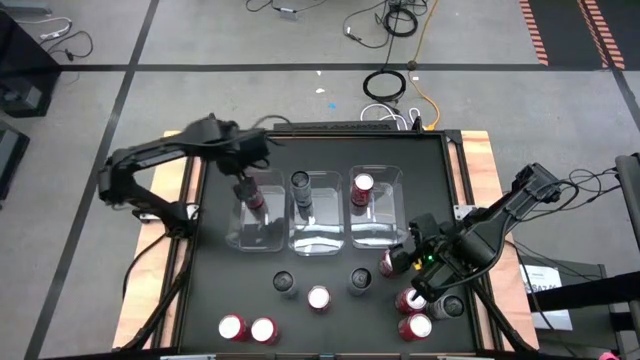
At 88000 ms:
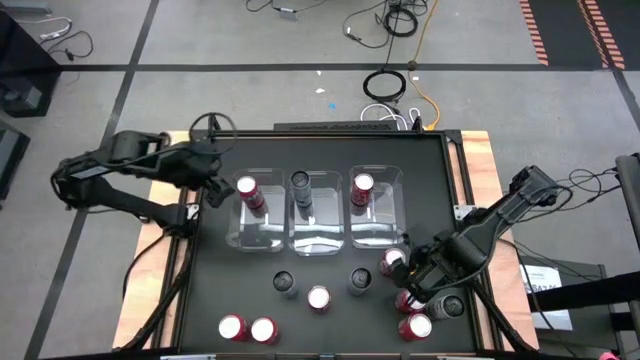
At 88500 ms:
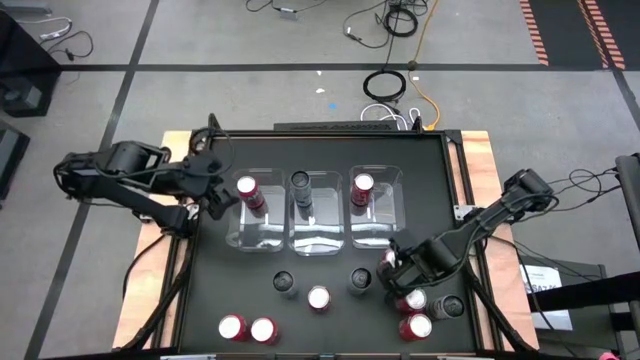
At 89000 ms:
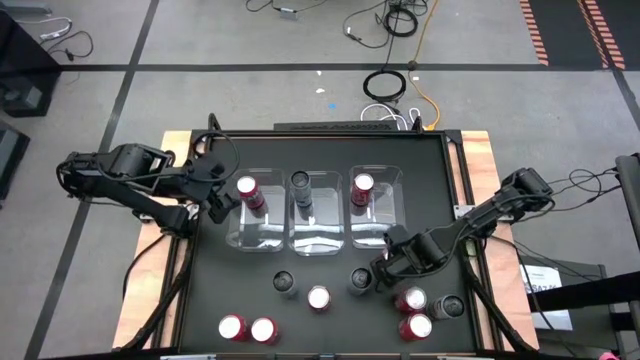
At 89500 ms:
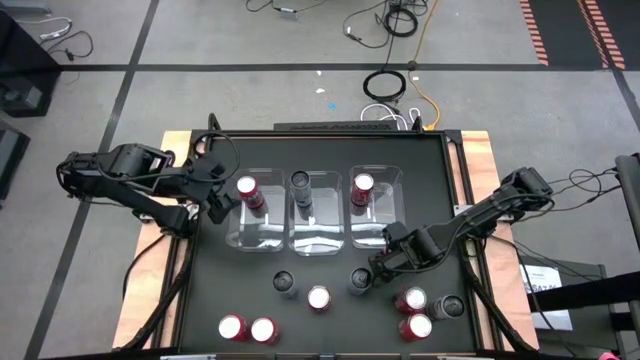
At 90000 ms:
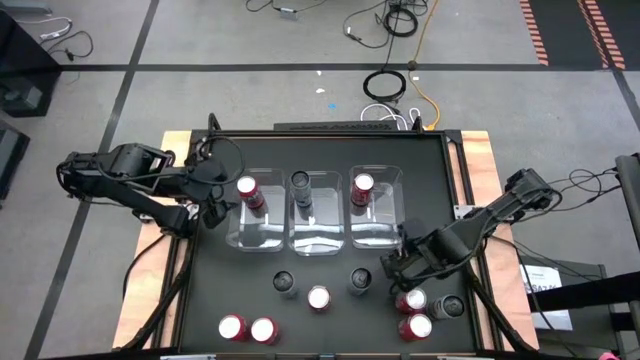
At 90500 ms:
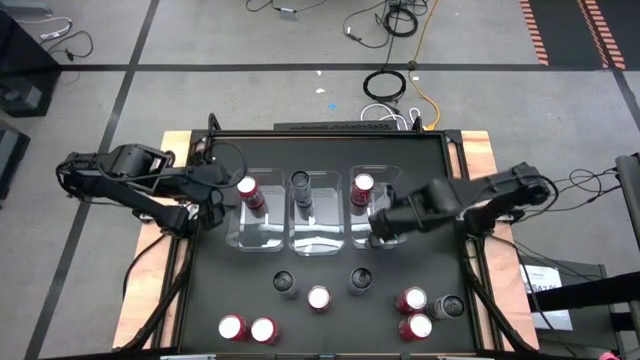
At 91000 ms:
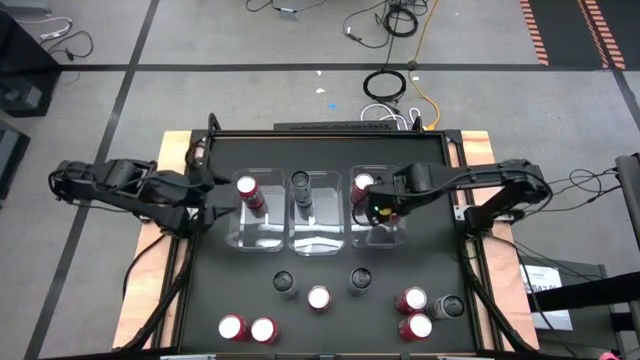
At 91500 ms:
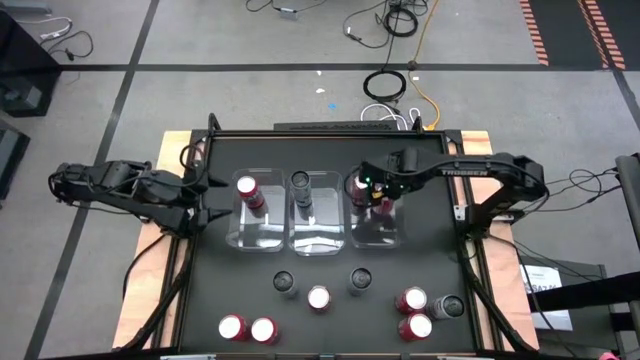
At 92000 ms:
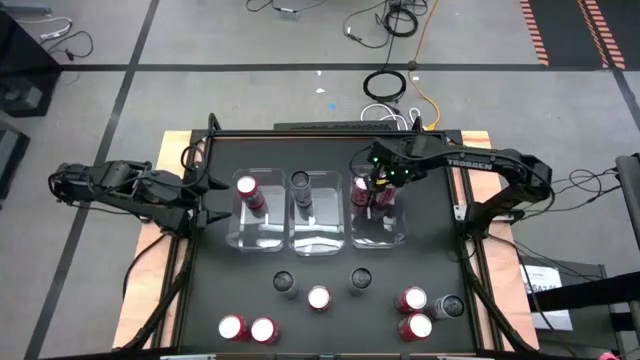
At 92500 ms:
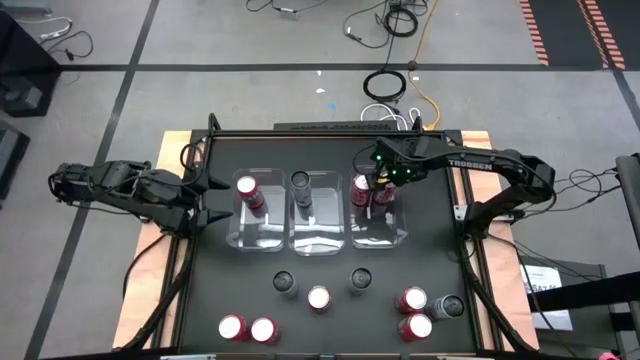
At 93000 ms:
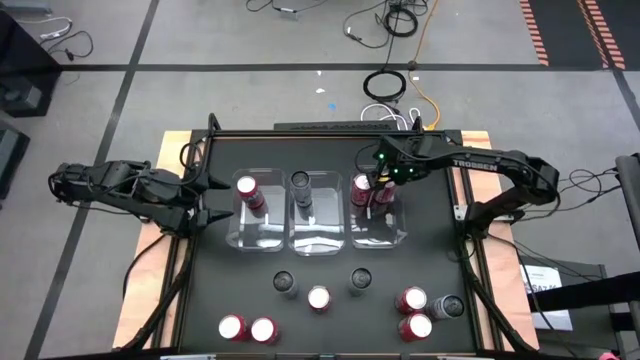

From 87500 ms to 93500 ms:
Task: Sort soda cans
Put the top right red soda can into the right transparent bin

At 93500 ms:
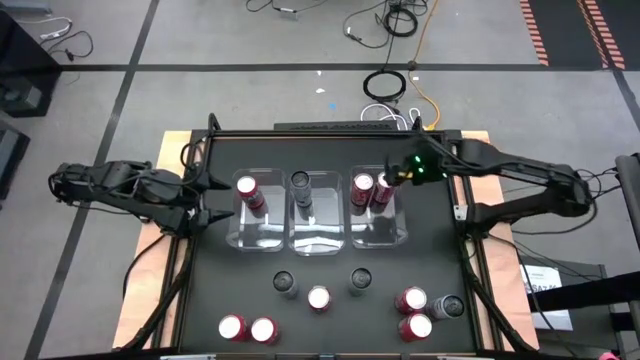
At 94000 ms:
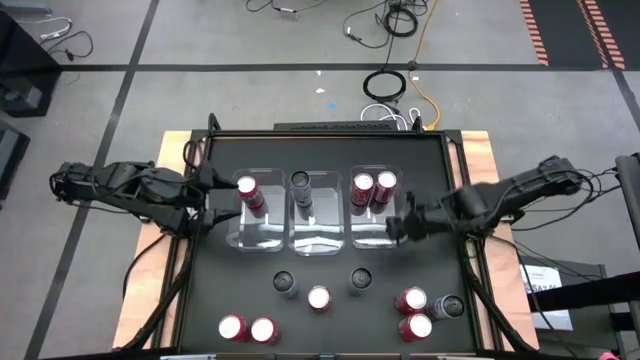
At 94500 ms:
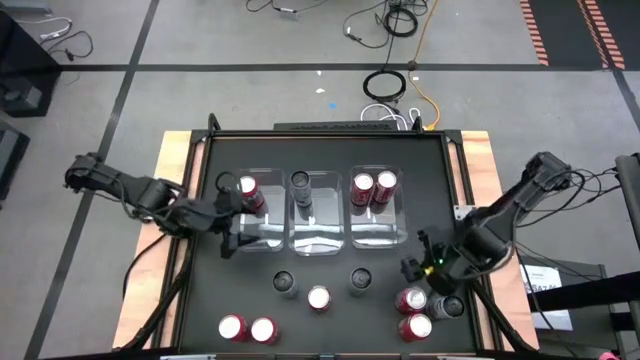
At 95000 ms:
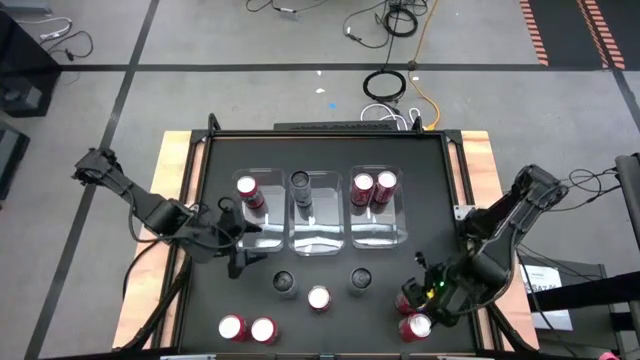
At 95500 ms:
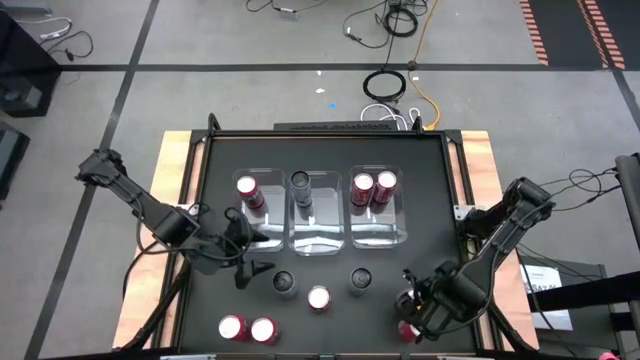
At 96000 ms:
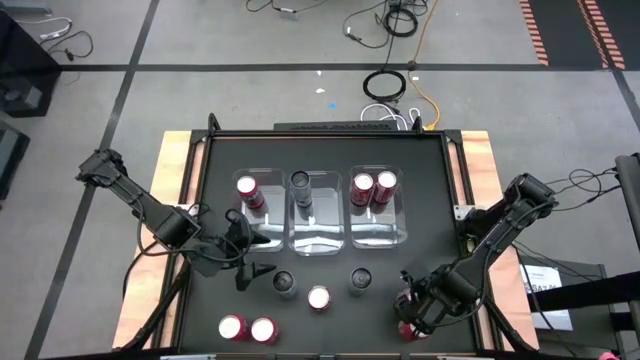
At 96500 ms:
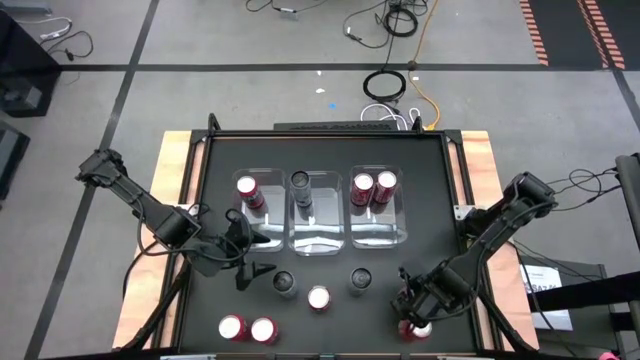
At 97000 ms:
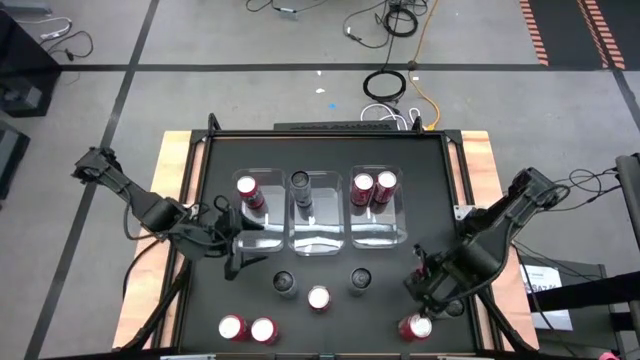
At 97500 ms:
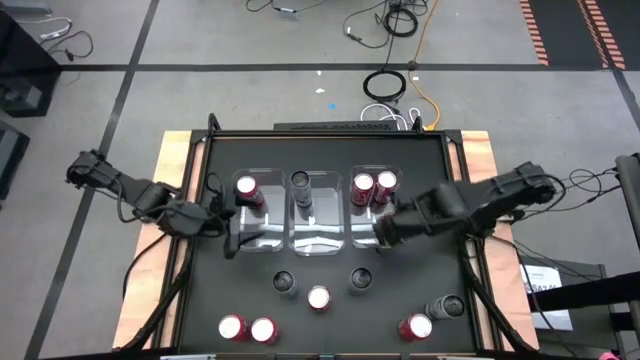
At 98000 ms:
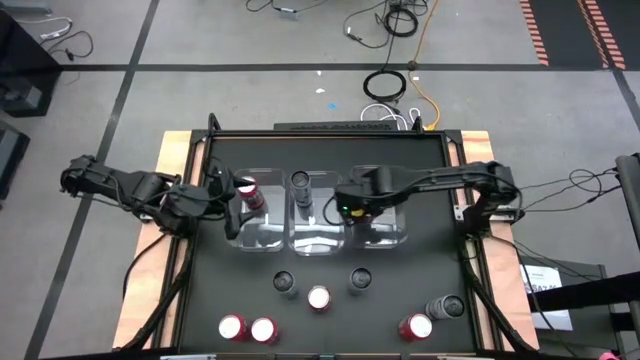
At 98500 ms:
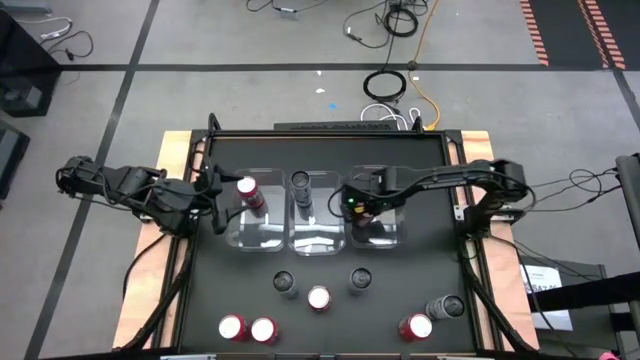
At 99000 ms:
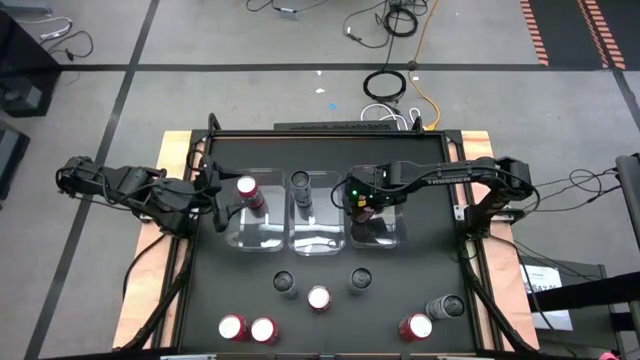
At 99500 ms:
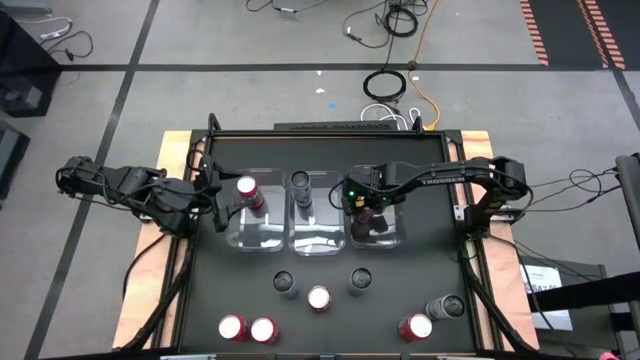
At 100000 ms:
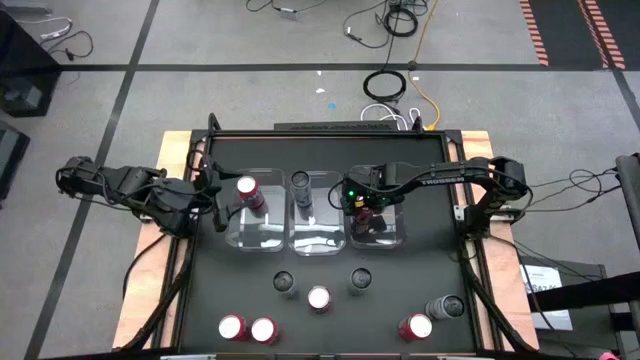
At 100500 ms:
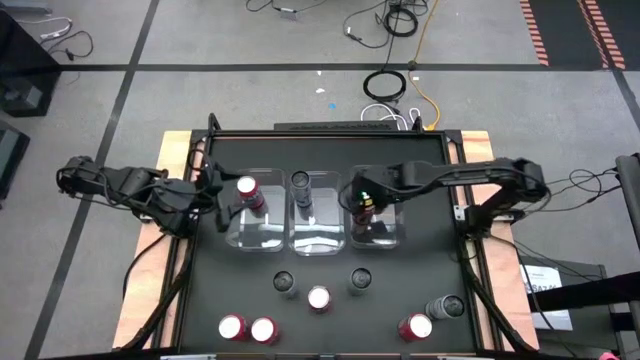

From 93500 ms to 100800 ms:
Put the right red soda can into the right transparent bin

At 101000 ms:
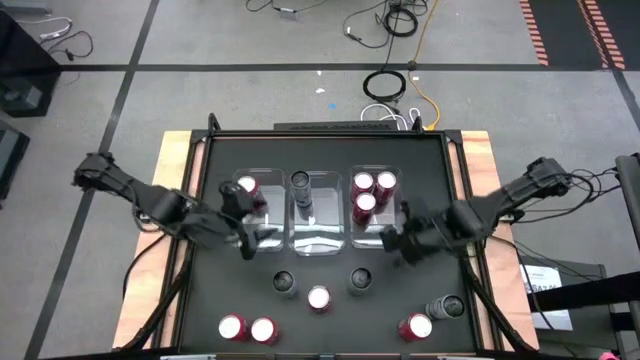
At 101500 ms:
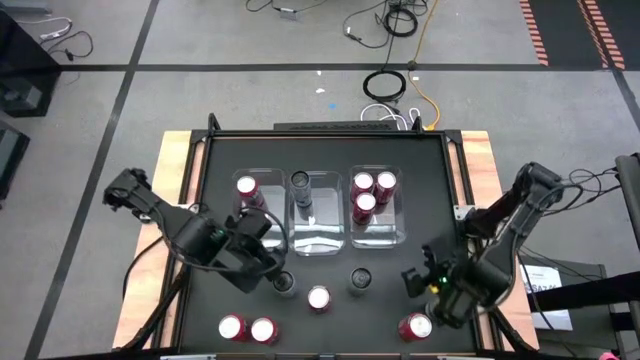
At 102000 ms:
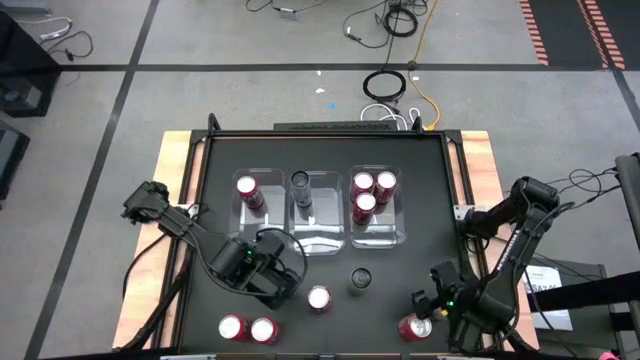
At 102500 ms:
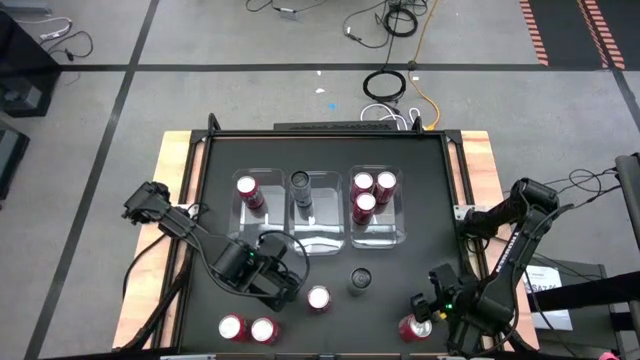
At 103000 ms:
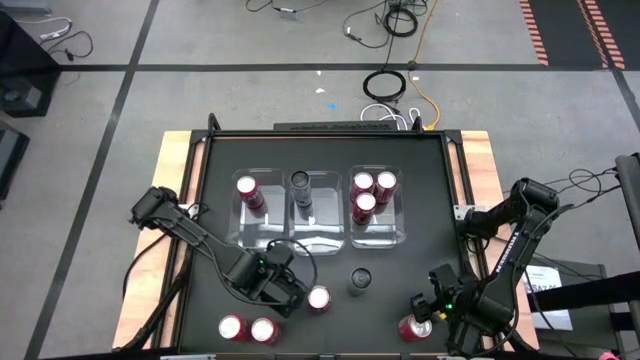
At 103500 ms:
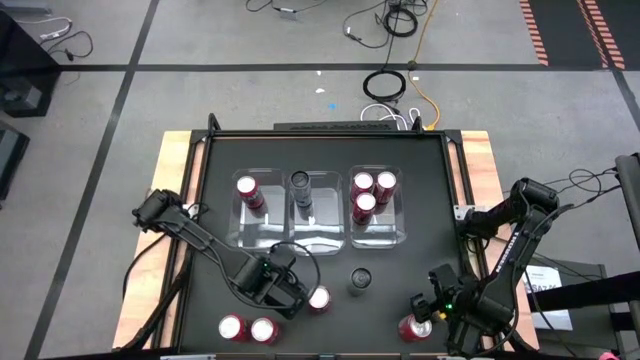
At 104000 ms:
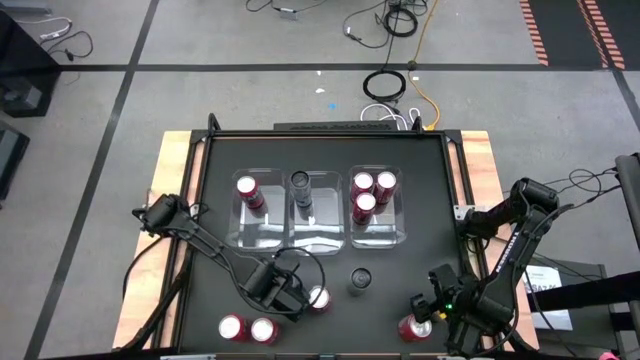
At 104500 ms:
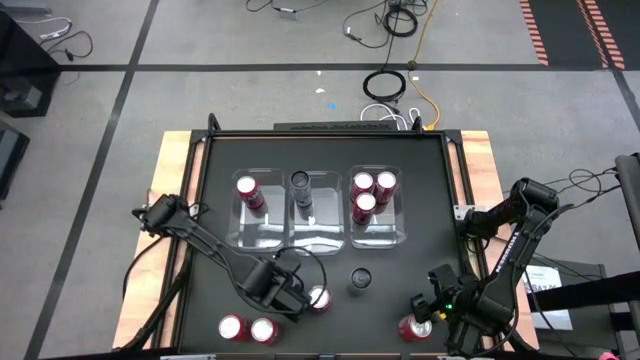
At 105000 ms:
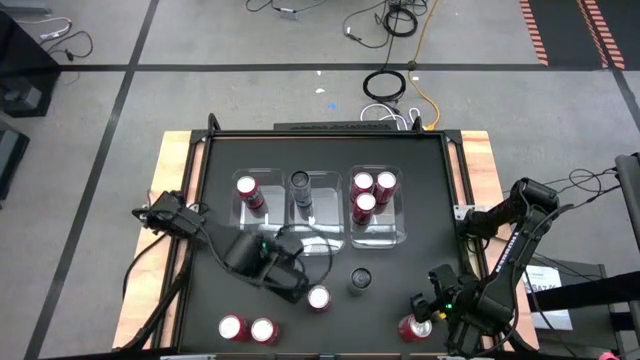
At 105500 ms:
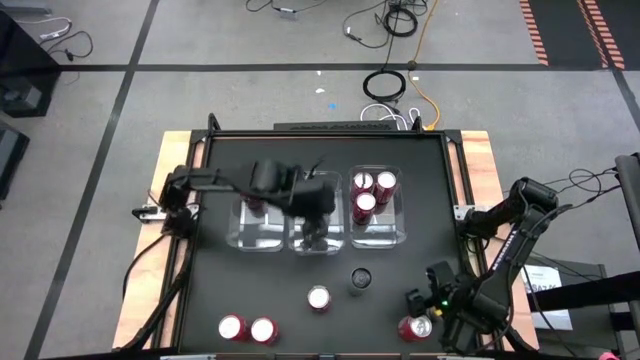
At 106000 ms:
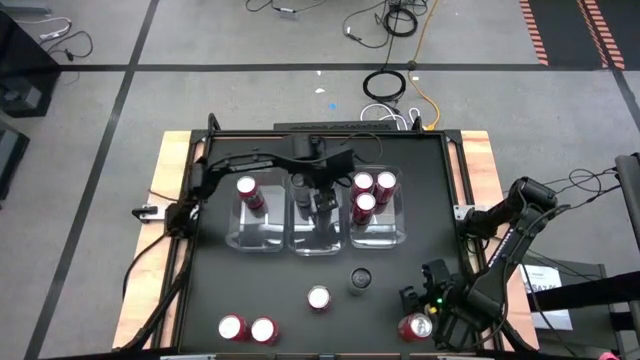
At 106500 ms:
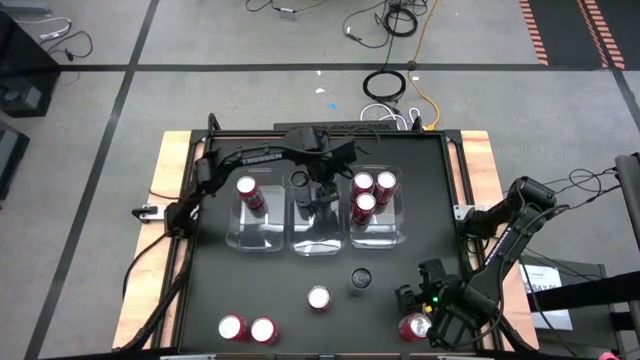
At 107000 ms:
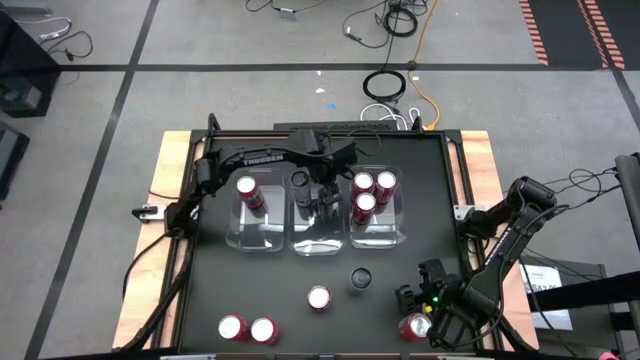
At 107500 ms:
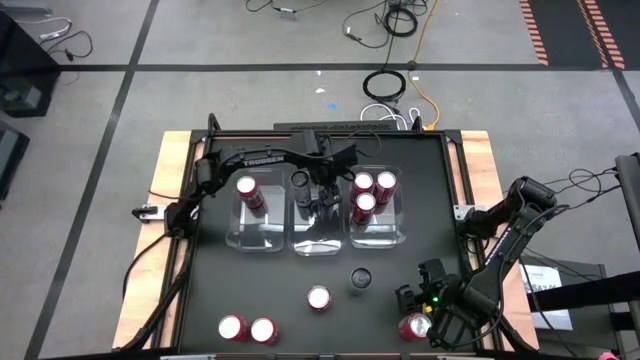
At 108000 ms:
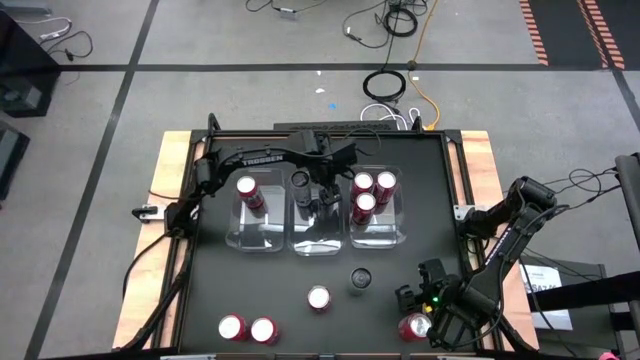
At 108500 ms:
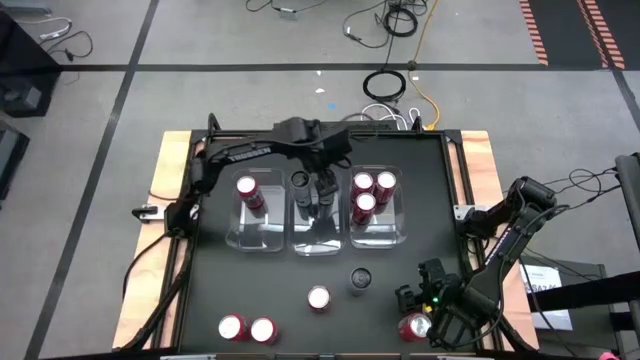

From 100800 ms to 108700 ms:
Put the top left white blue soda can into the middle transparent bin
